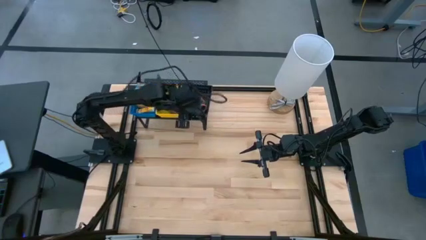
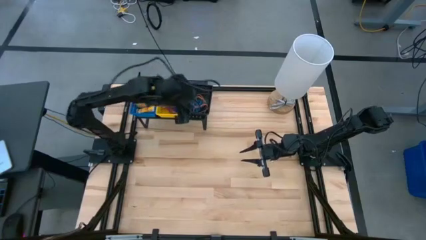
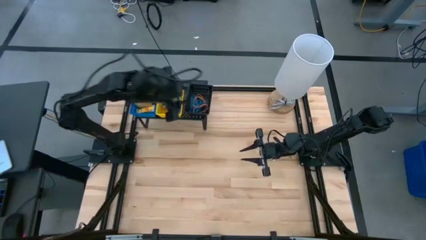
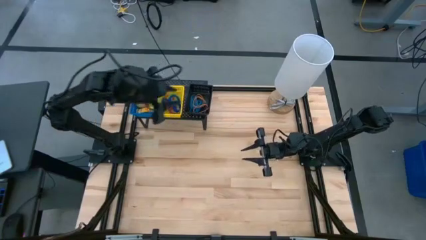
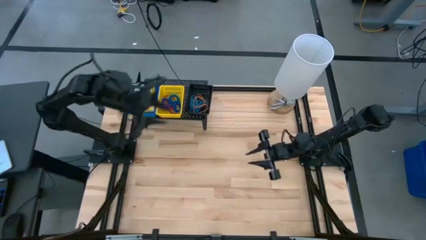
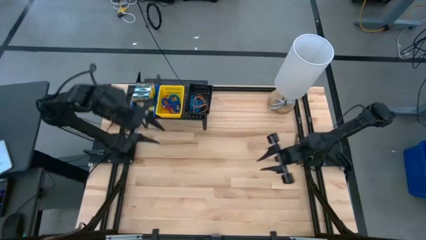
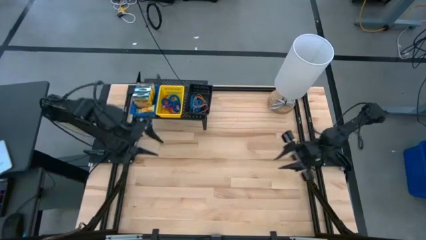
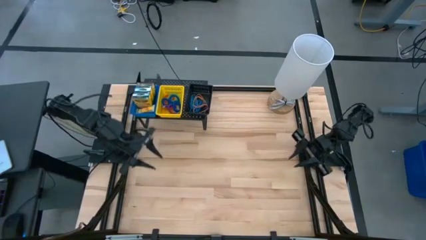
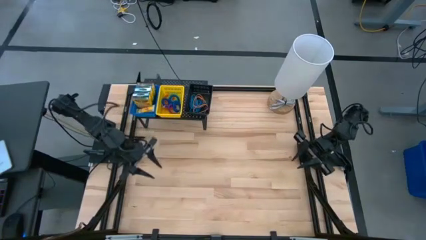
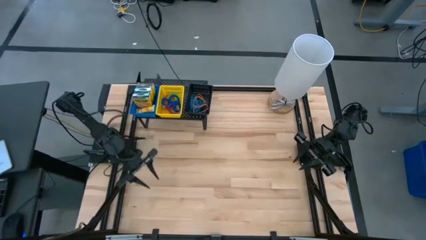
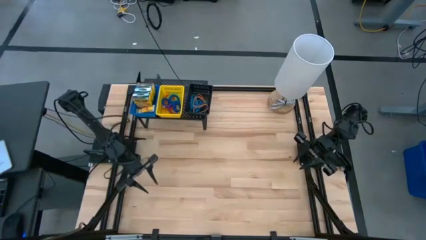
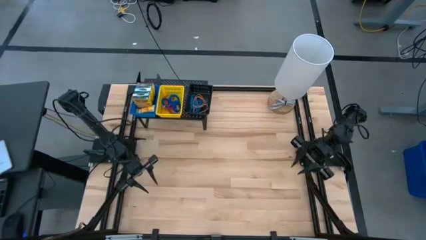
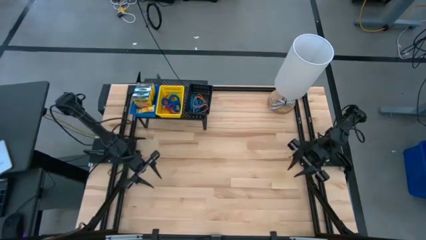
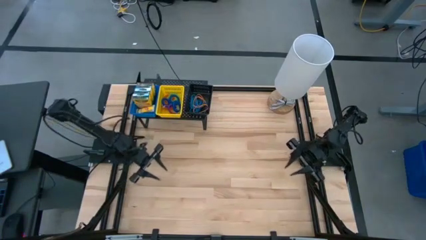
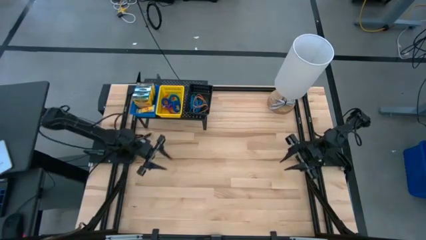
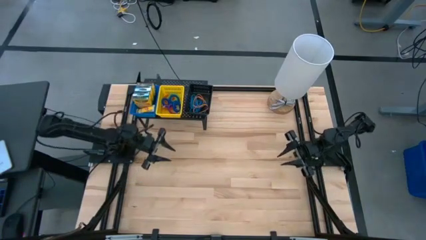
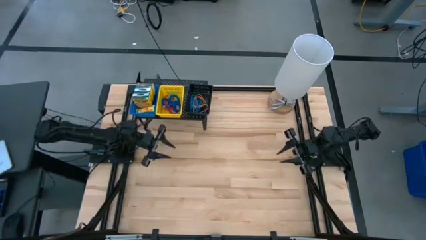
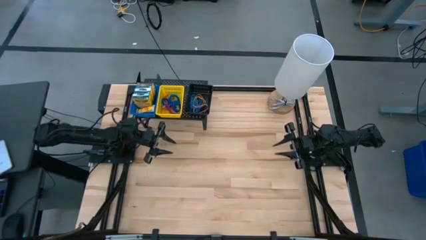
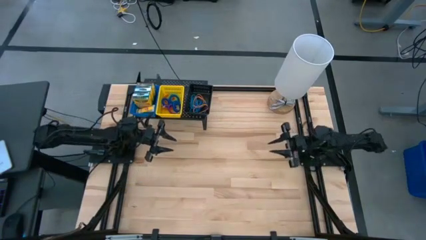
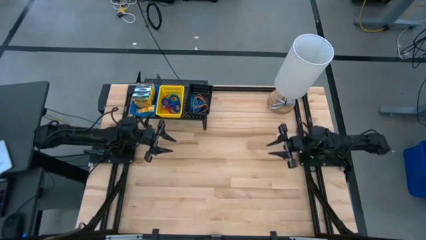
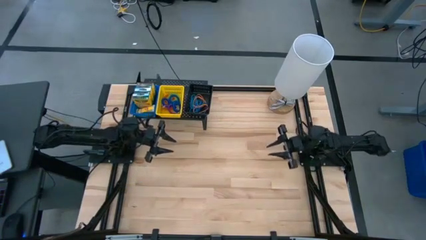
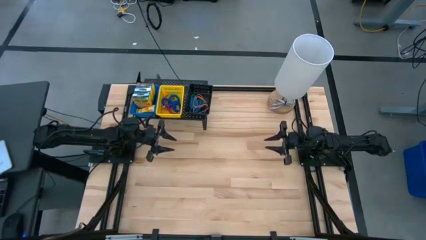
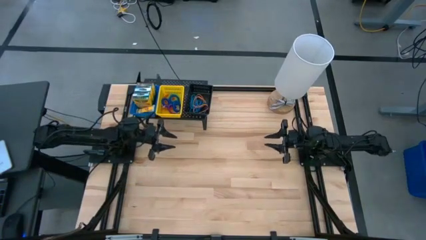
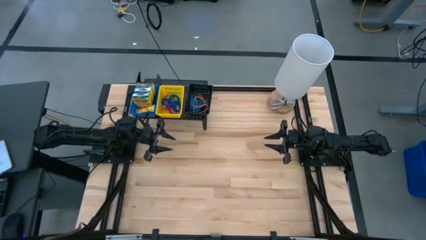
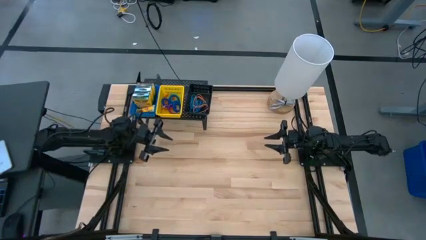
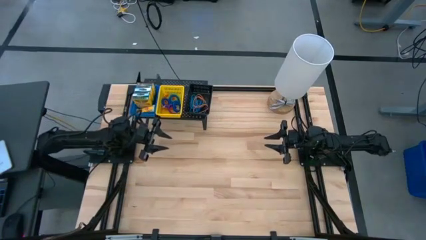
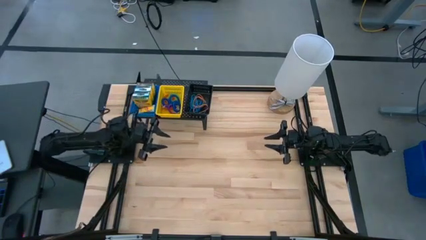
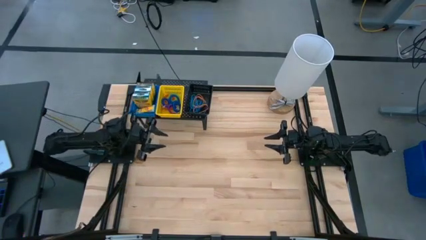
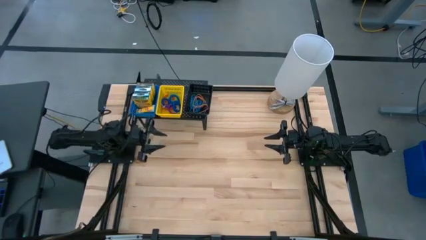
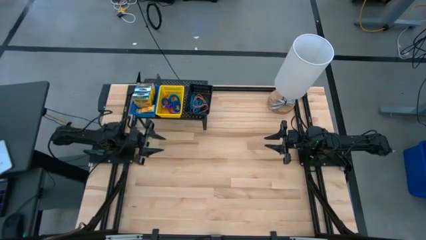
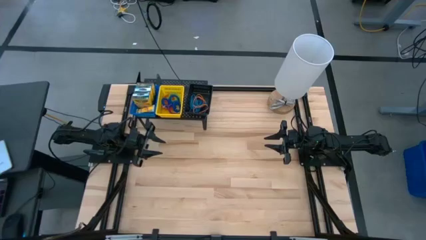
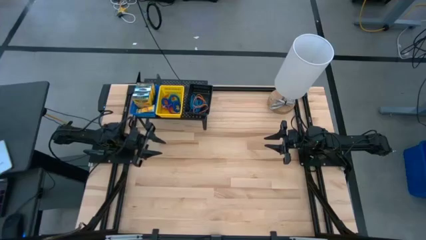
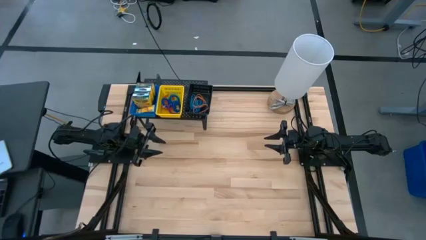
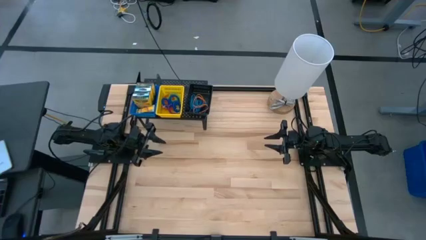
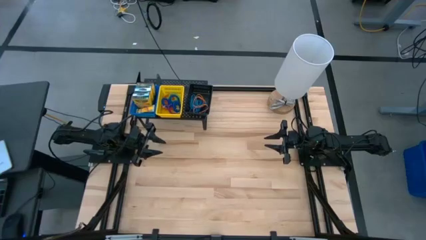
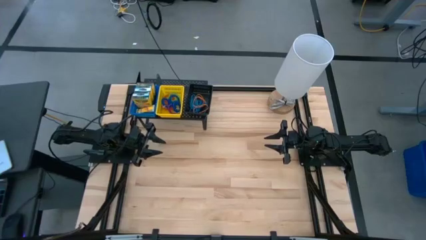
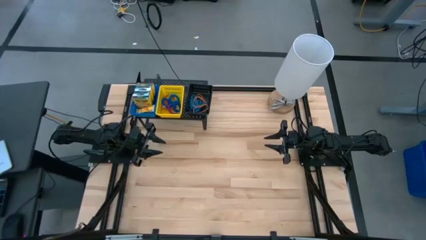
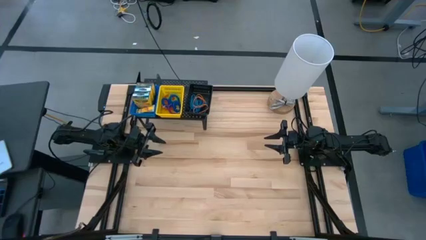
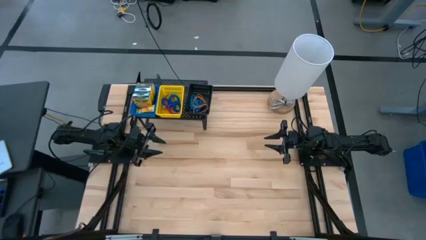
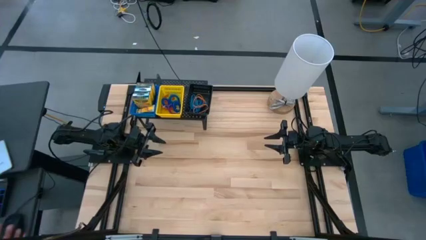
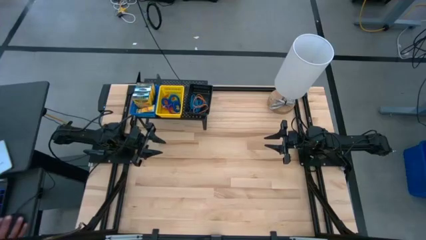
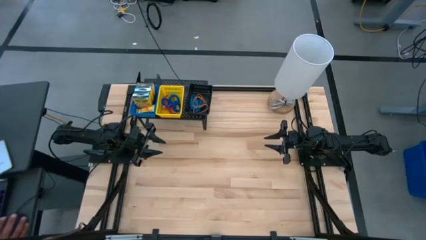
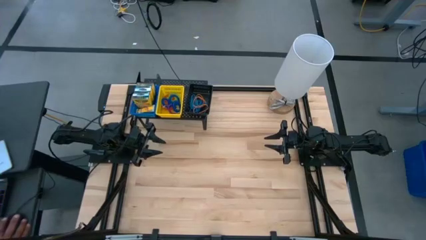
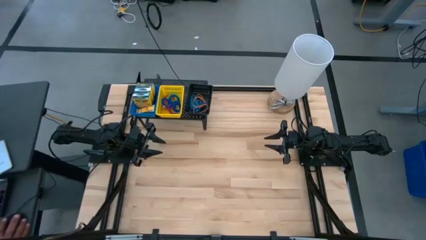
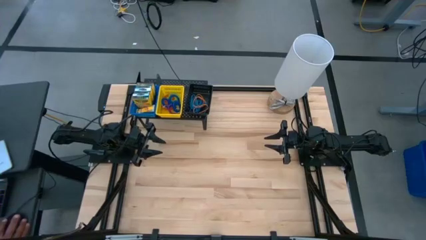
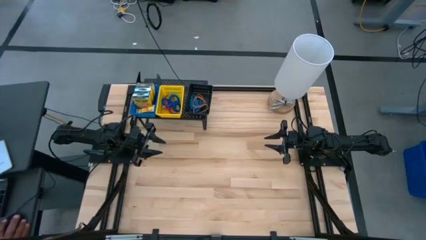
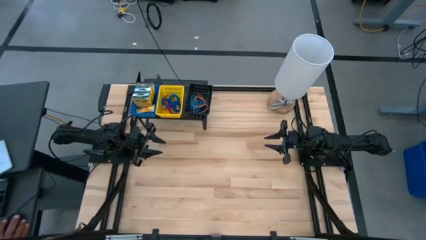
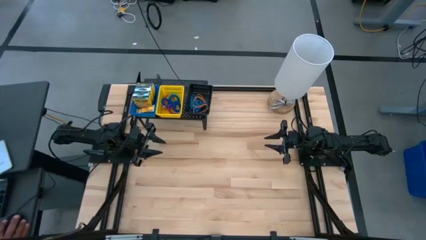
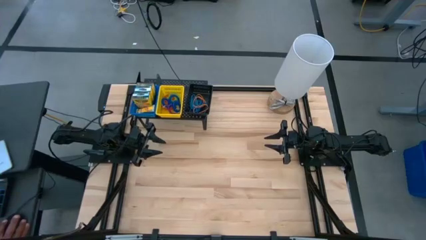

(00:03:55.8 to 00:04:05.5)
Task: Pick & Place Office Desk Supplies
Return to Home Position

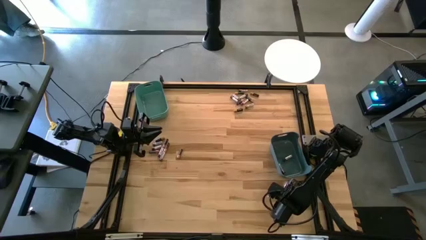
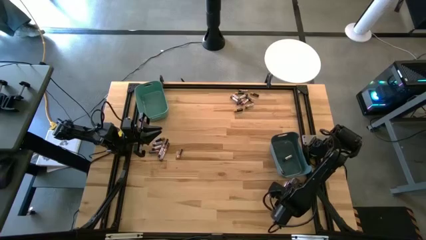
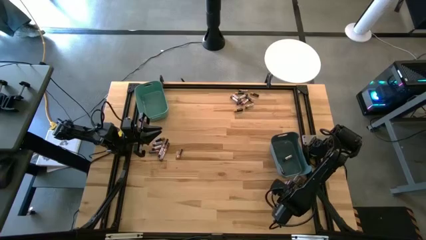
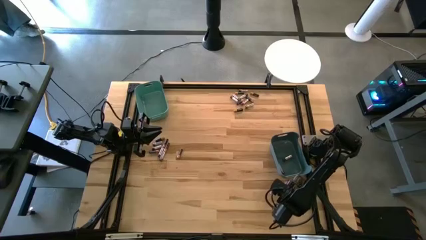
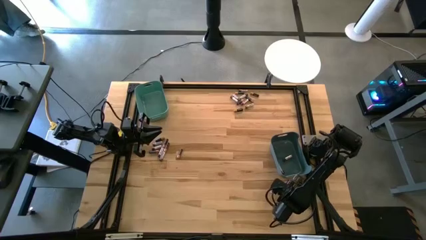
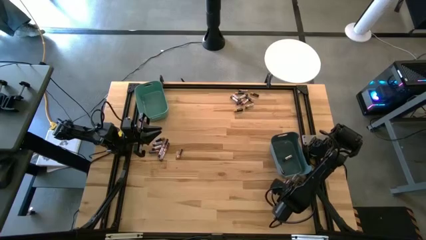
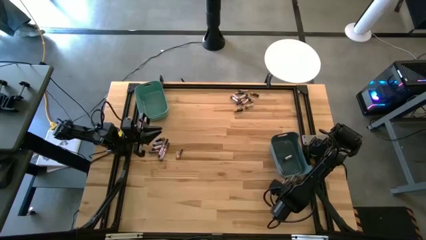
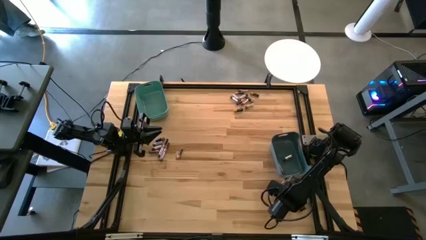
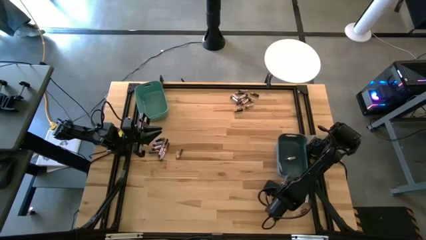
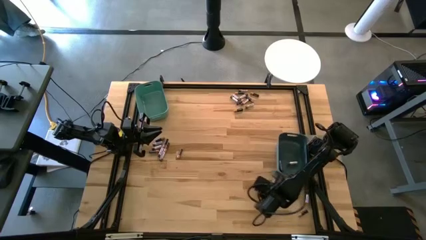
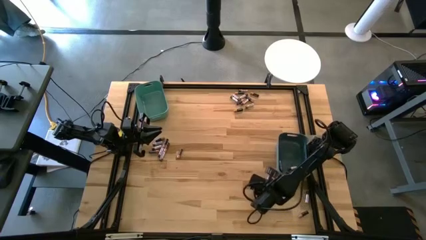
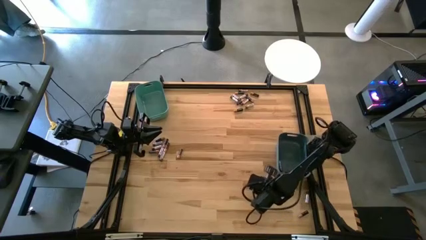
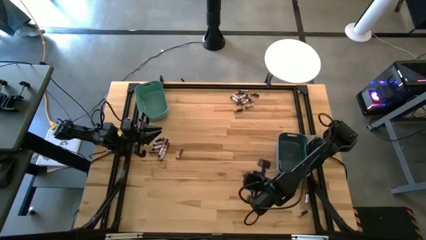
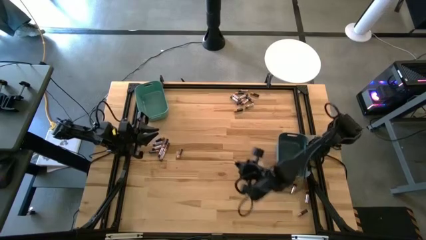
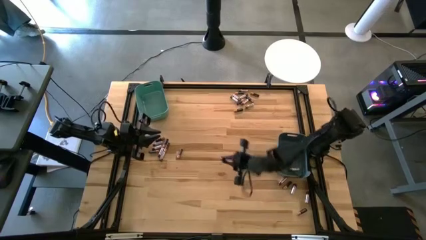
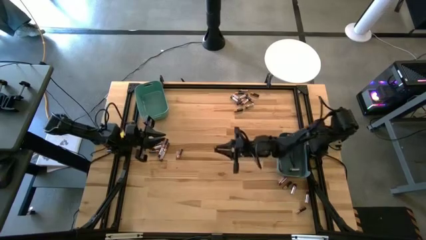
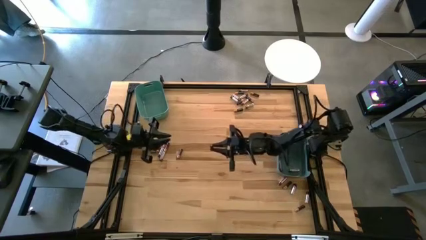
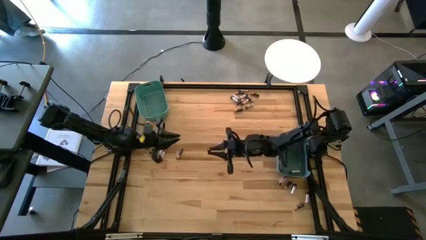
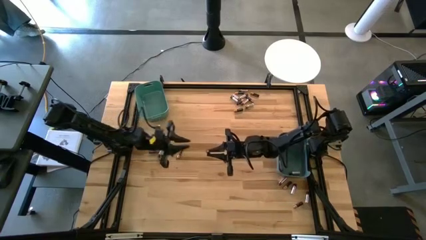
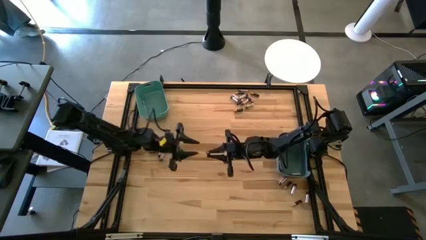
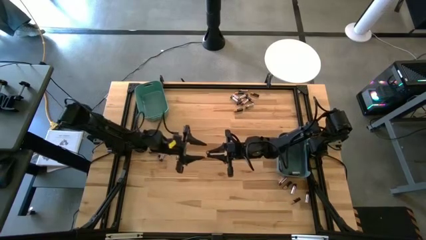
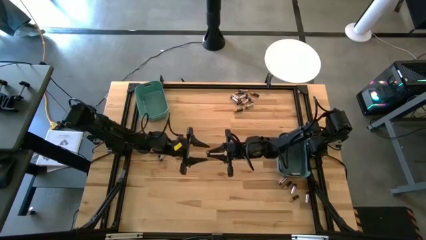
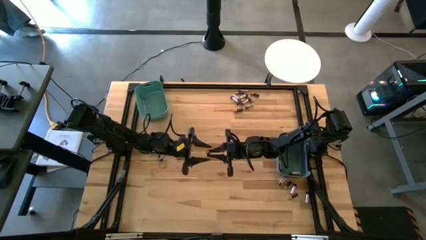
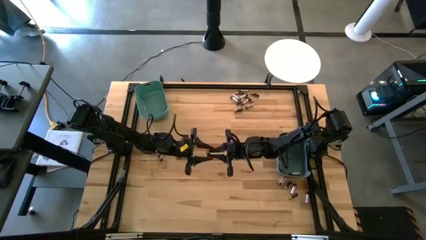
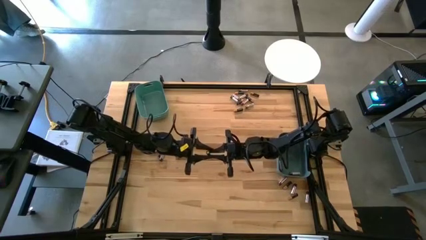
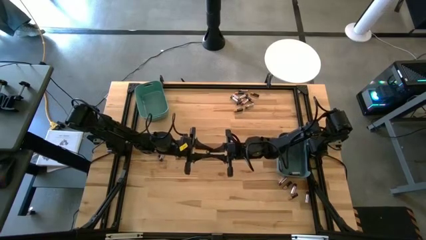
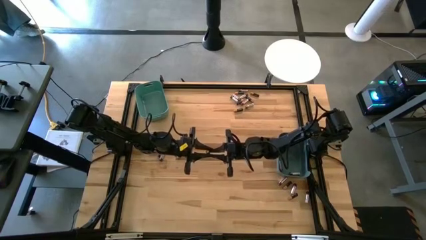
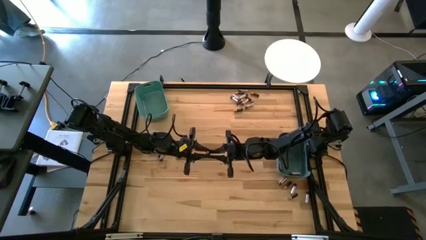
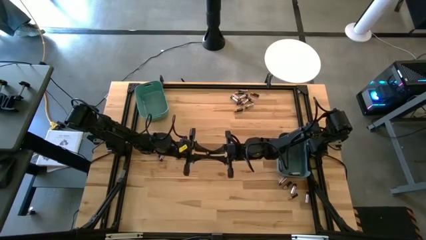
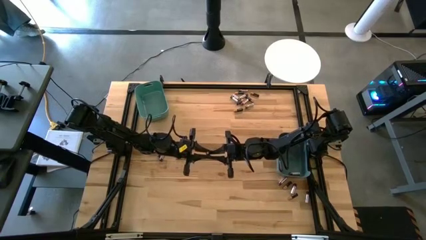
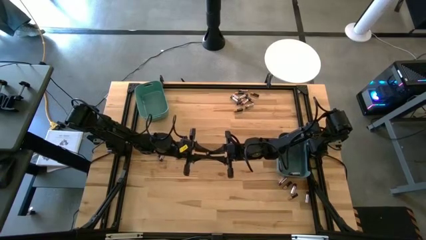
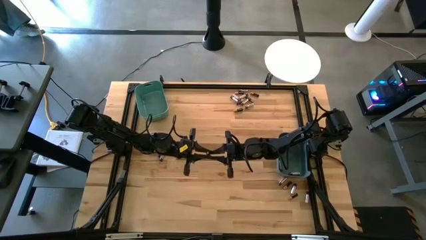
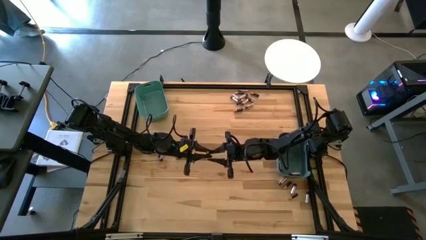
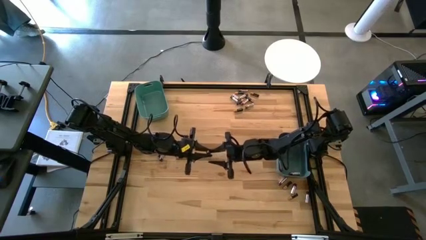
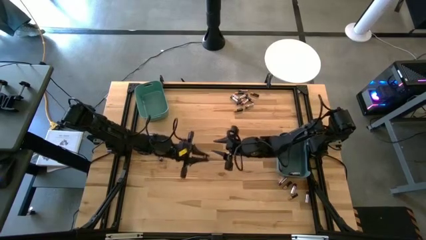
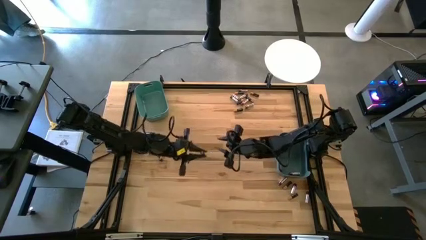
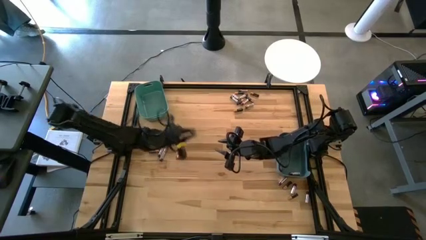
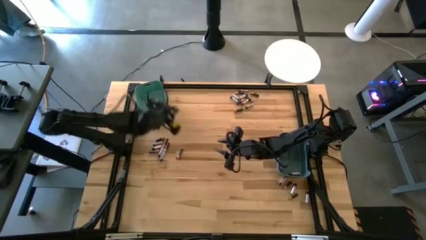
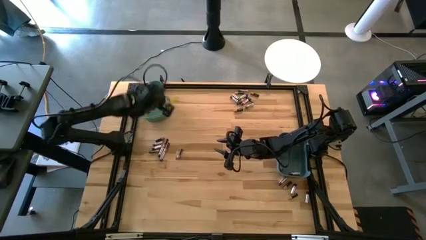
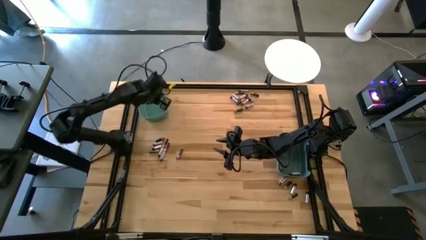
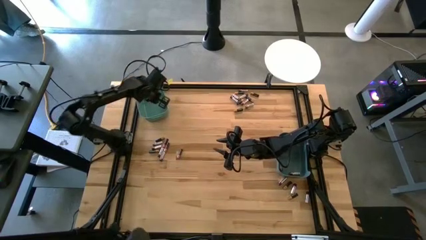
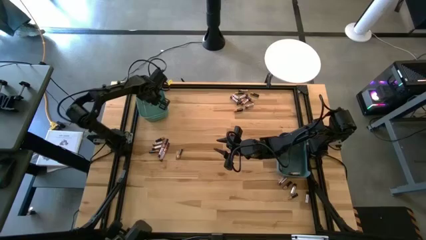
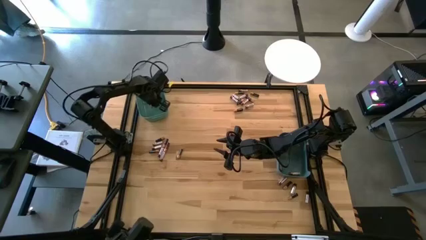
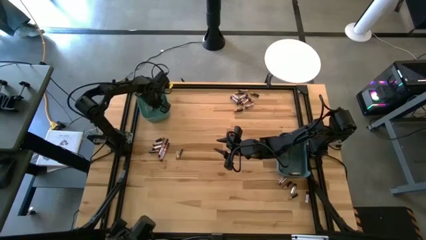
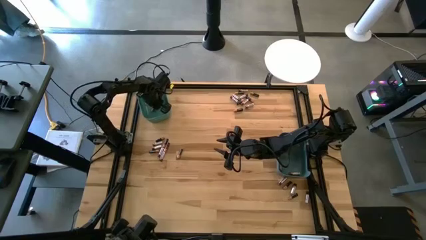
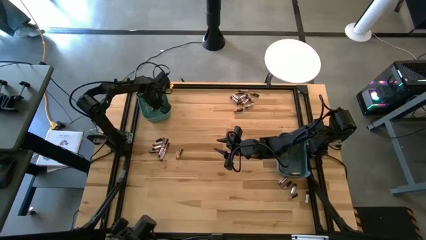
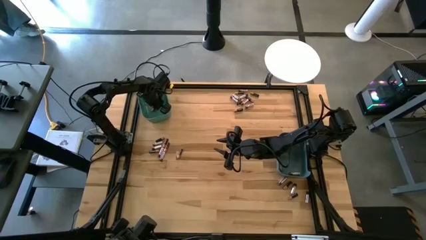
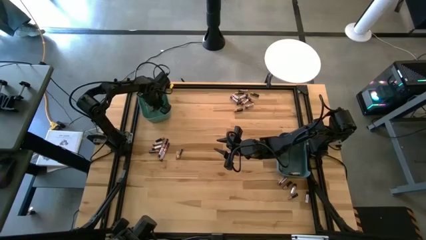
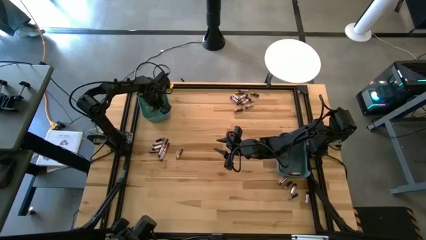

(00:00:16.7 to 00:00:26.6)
Task: Sort batteries
Put the black battery into the green bin
